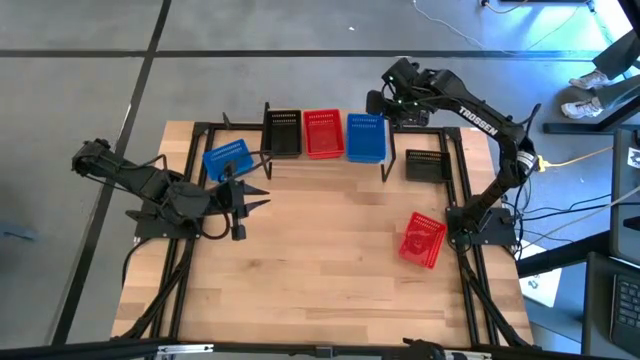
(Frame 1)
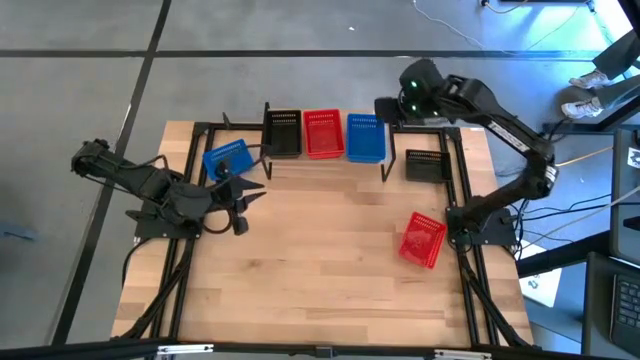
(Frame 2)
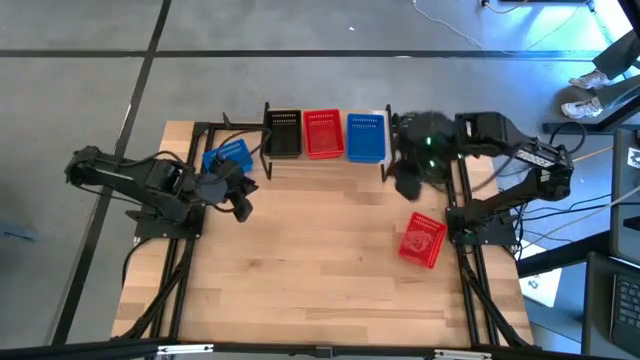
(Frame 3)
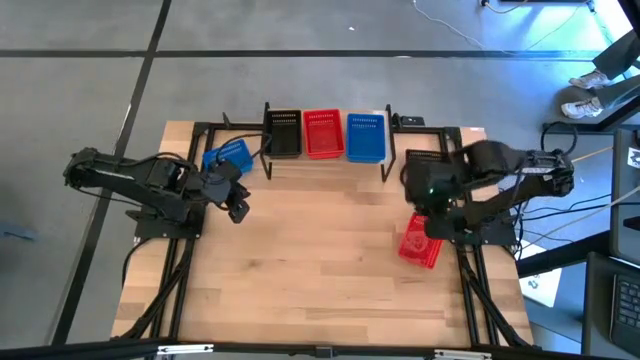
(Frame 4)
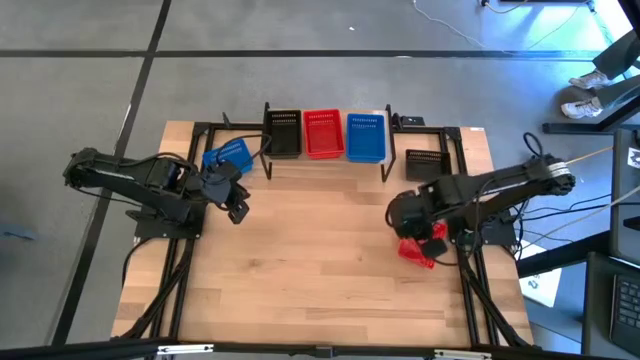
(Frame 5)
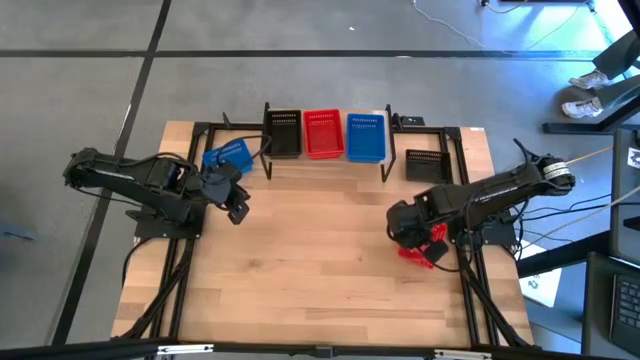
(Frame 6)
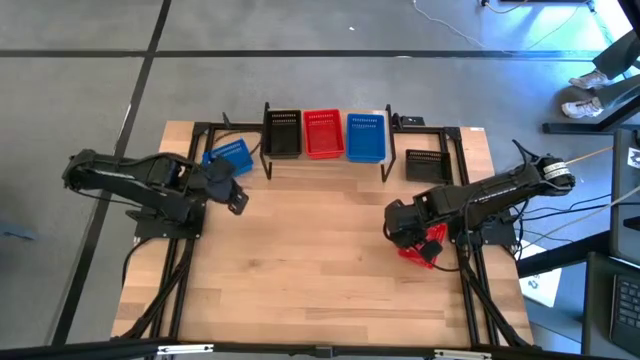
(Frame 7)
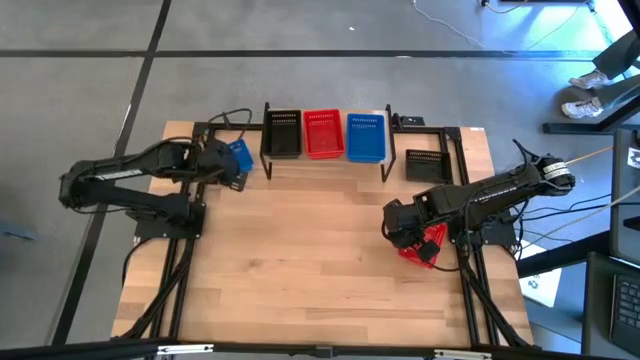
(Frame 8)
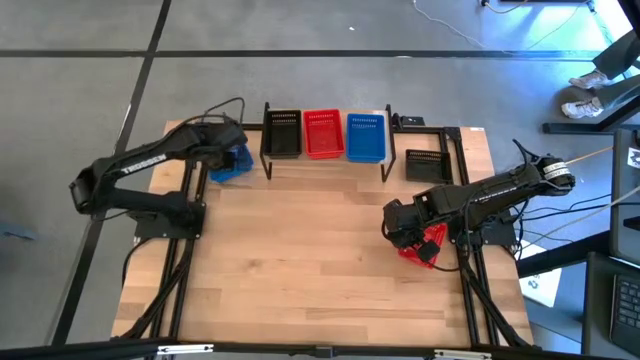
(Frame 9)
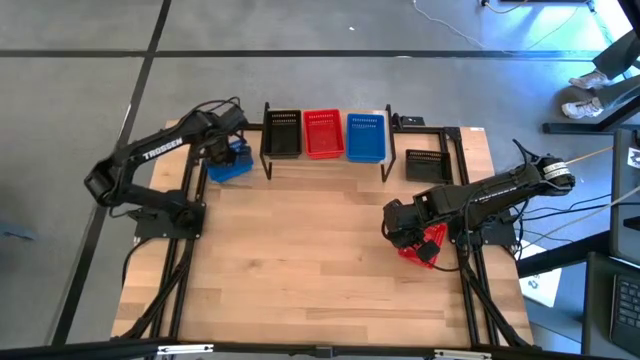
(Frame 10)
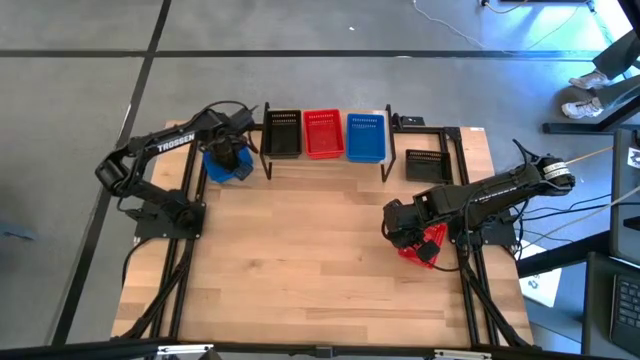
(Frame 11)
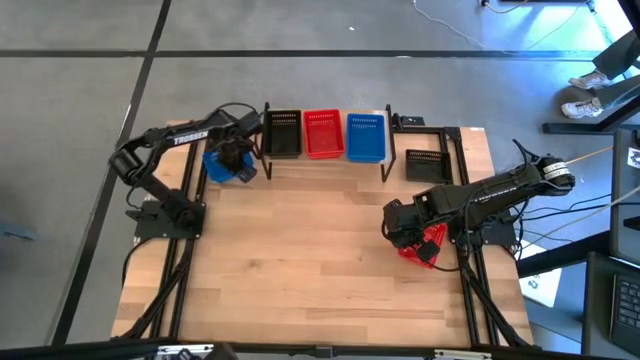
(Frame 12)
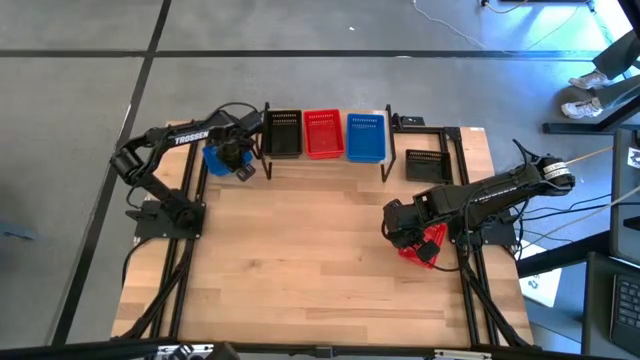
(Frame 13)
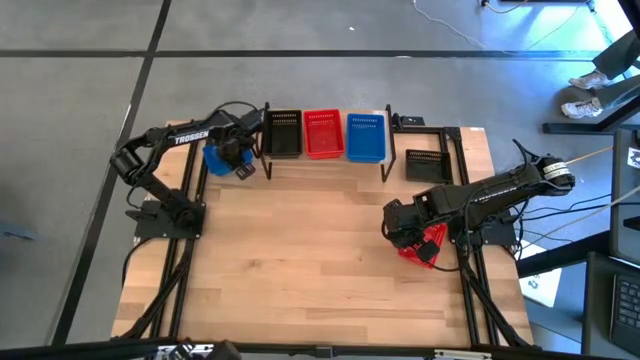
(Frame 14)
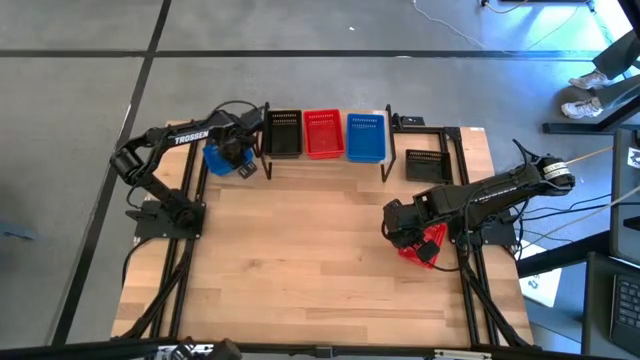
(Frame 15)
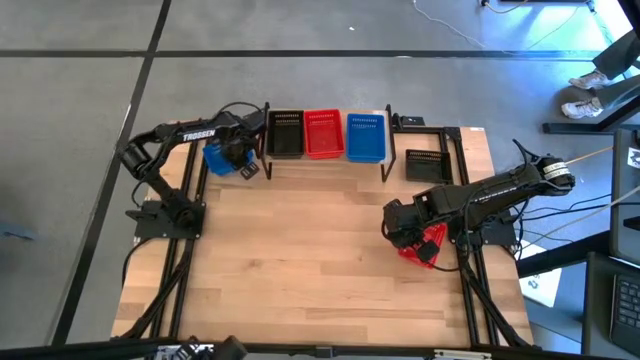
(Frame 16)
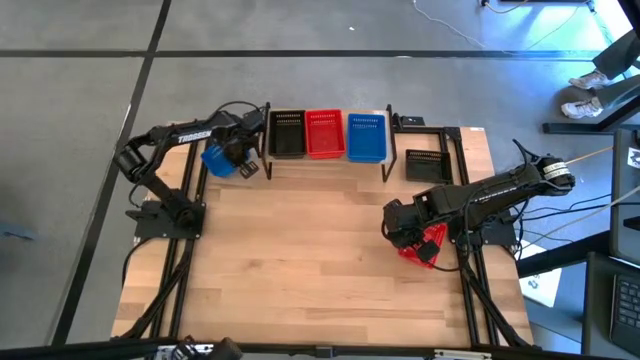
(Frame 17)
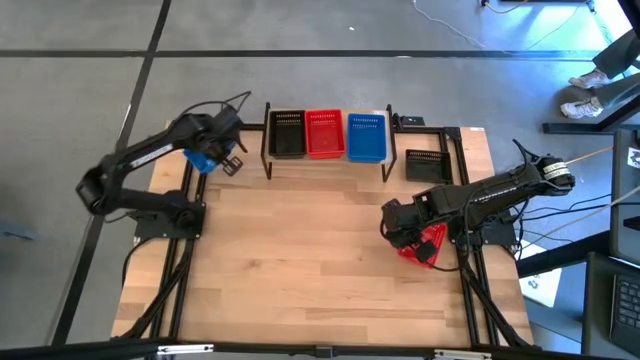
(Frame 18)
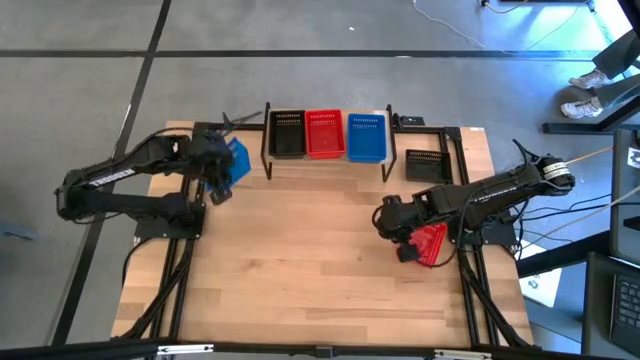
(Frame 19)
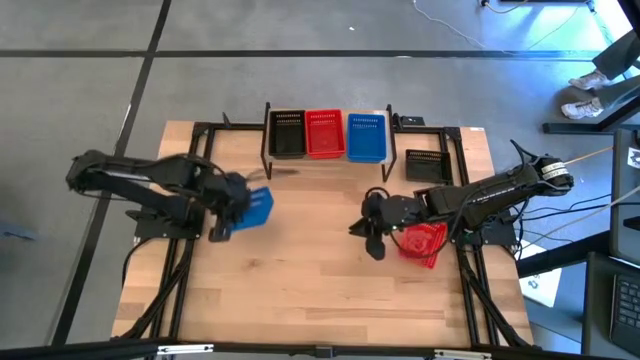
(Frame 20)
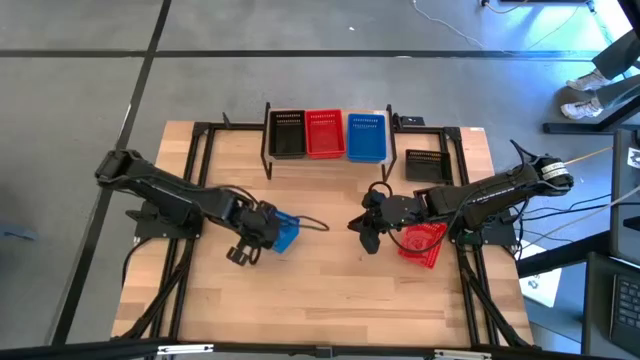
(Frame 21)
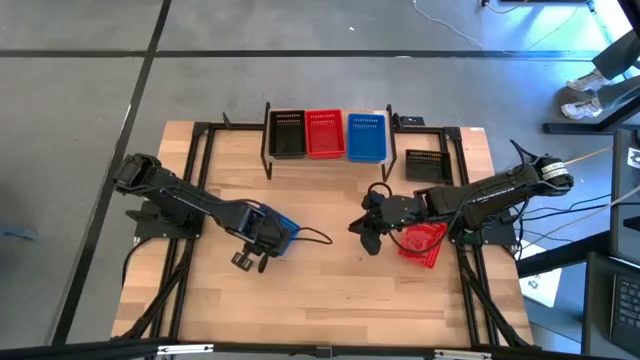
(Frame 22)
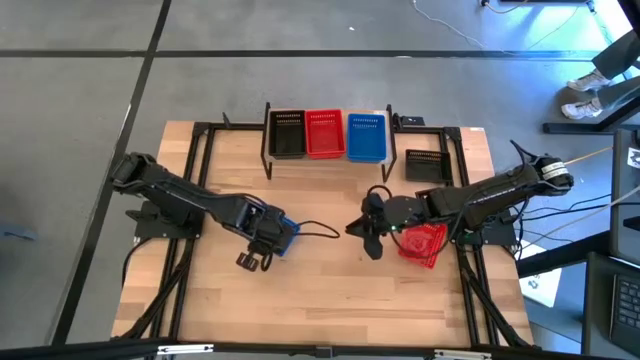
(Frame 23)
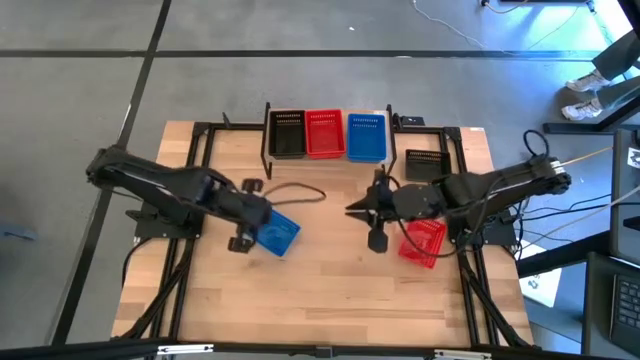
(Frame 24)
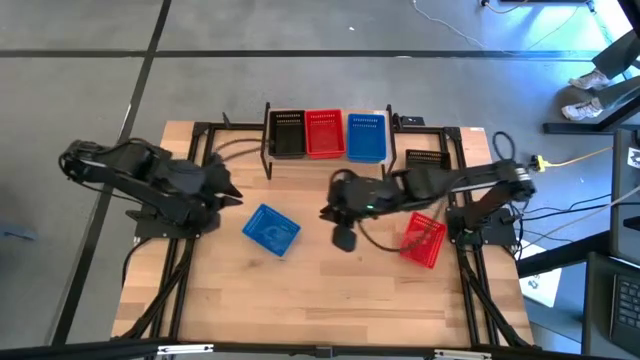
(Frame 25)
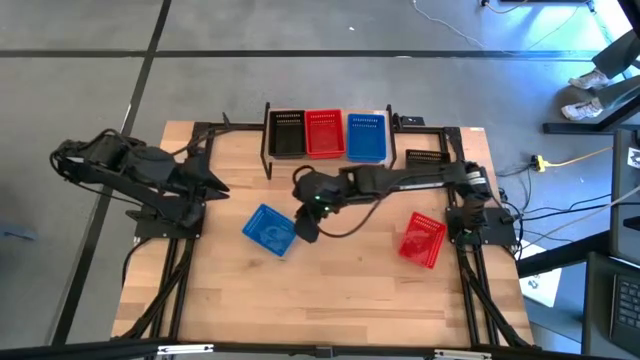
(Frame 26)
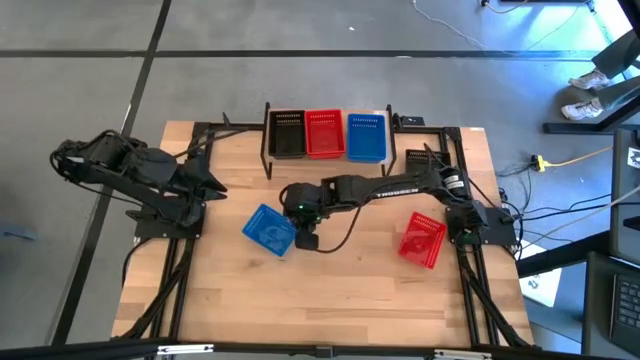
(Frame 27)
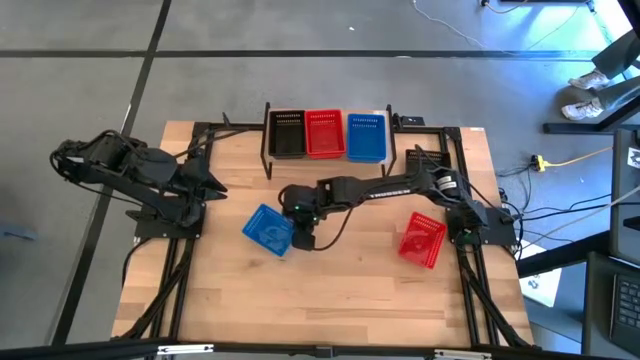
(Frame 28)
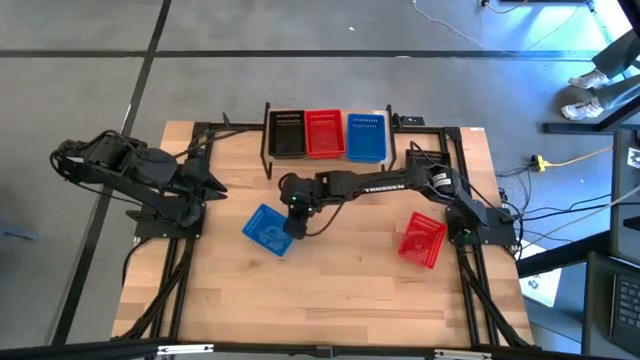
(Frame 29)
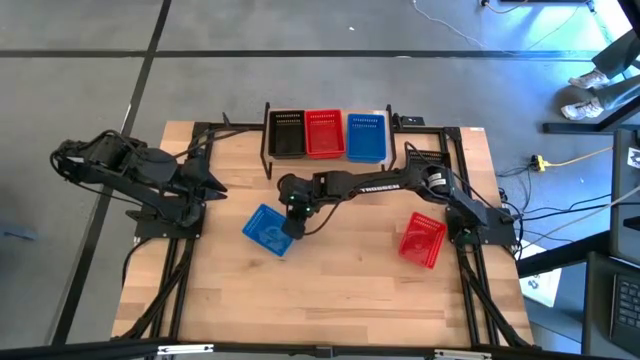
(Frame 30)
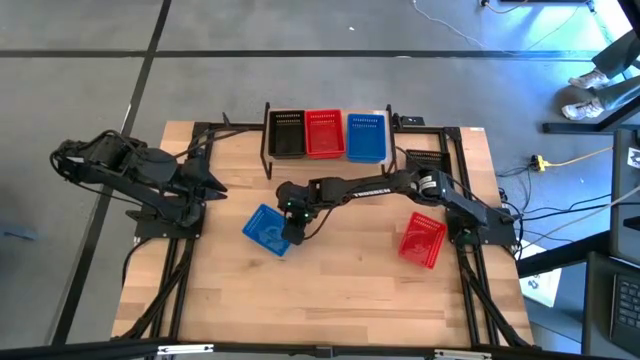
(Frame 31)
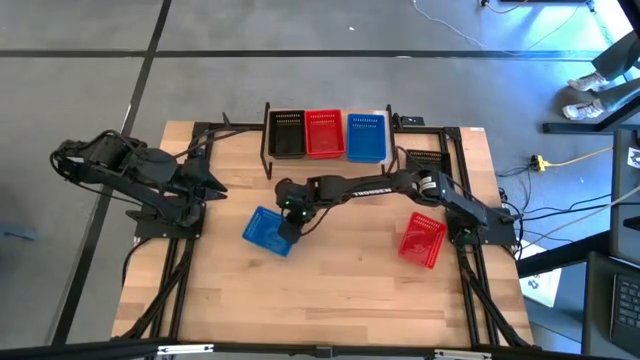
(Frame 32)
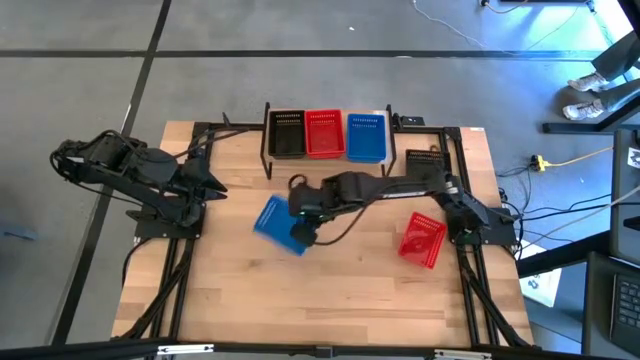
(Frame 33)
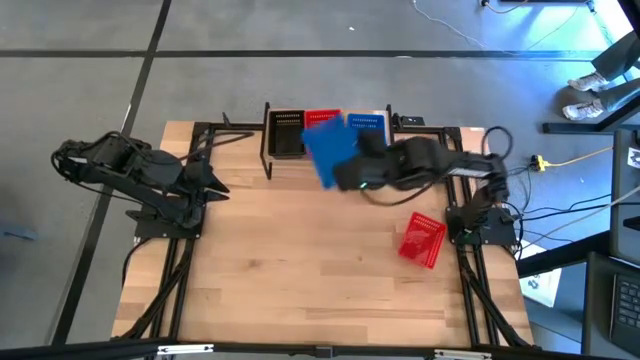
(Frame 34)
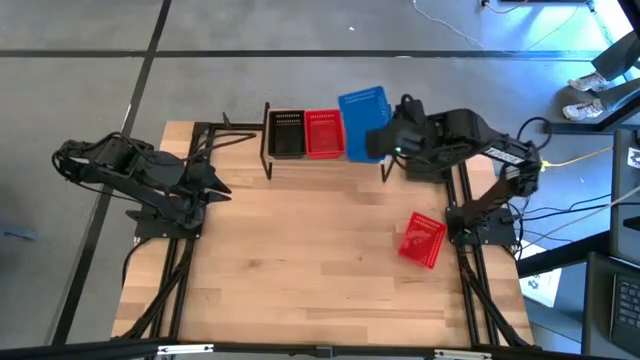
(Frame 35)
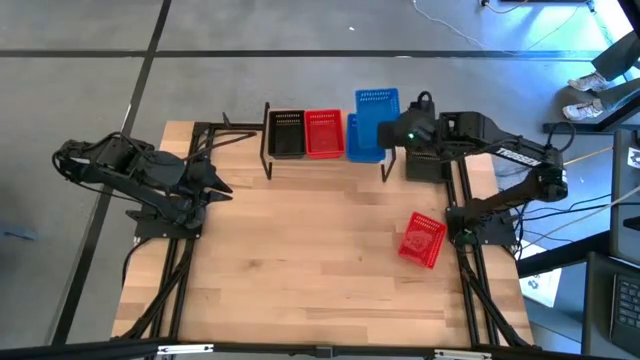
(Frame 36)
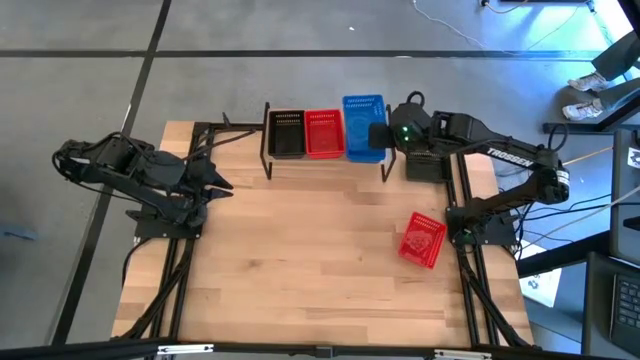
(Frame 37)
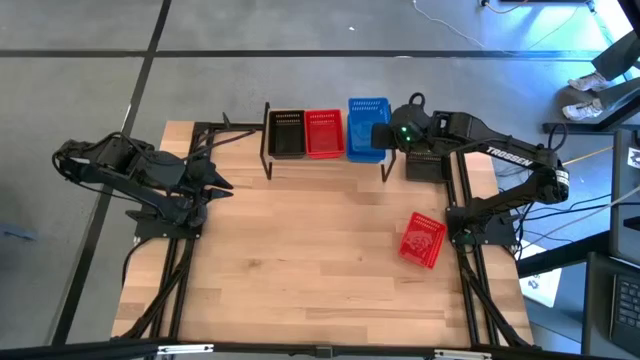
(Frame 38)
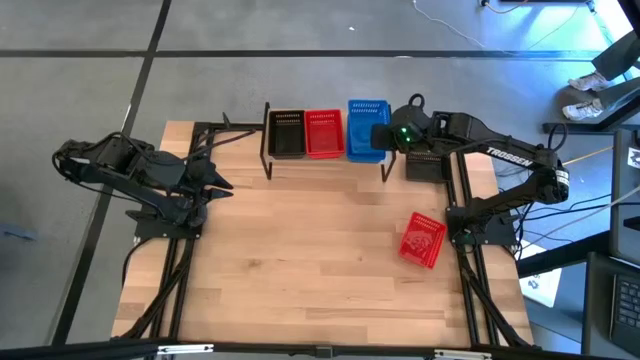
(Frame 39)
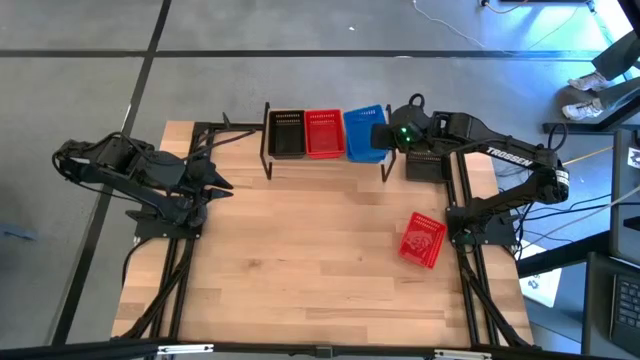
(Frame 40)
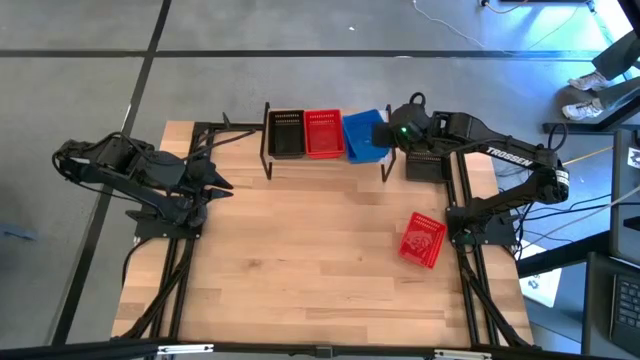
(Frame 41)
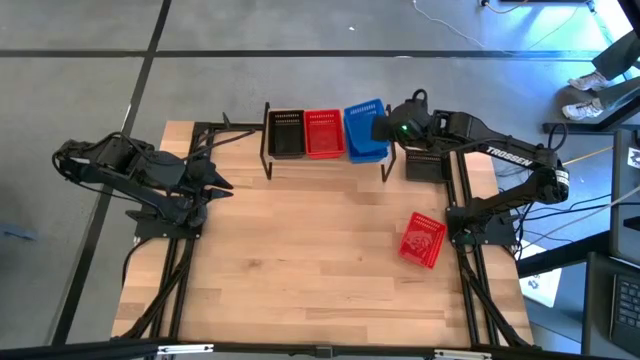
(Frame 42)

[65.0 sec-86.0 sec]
Task: Stack baskets on shelf by color
Stack the blue bin on the blue bin on the shelf

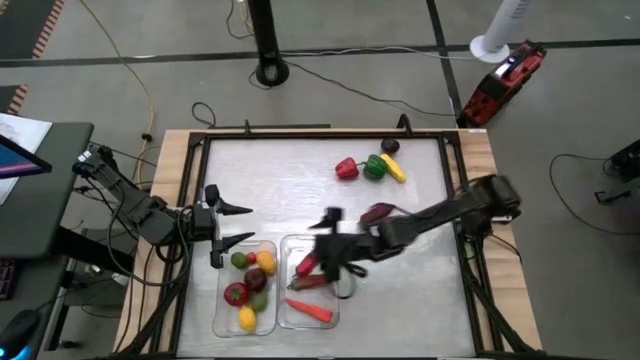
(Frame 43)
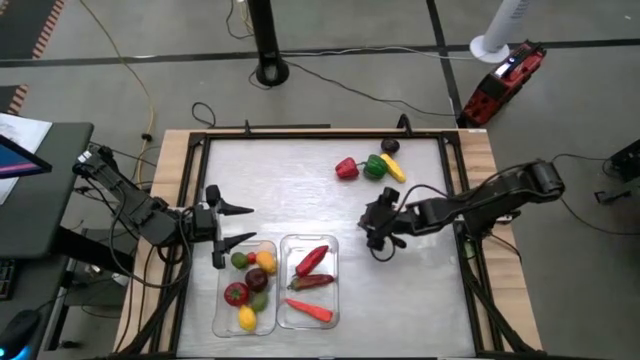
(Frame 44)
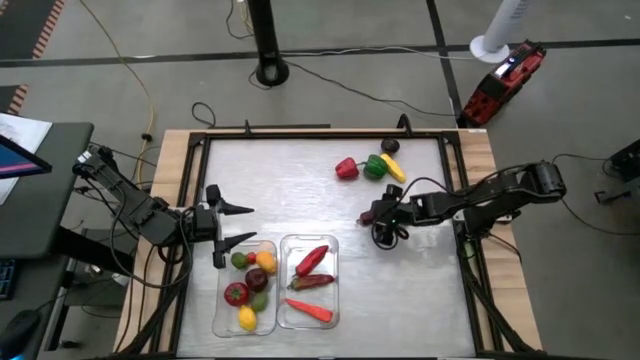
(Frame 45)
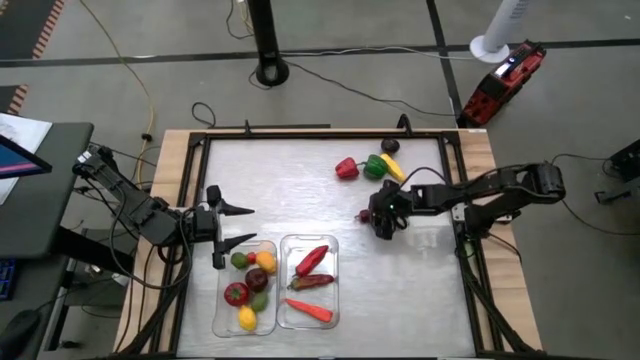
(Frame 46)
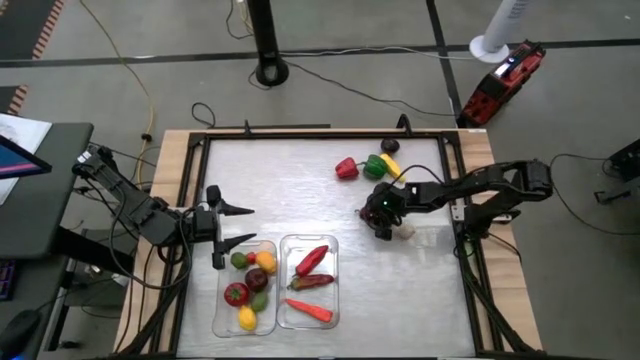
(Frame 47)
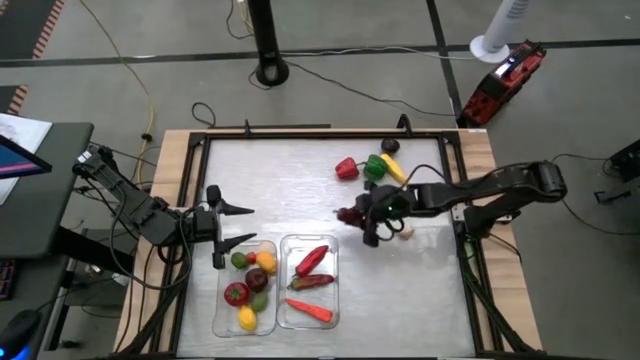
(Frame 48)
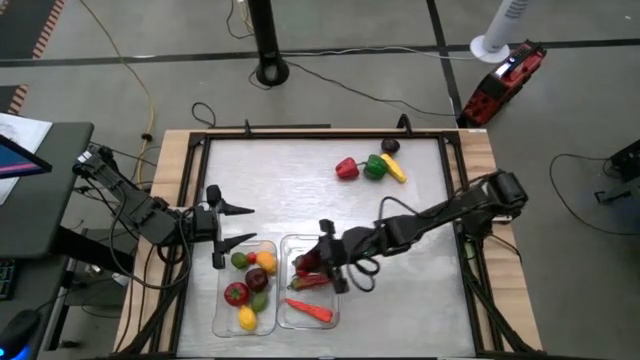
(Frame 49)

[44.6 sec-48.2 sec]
Task: Sort produce into baskets
Put the dark red chili pepper into the right transparent bin
